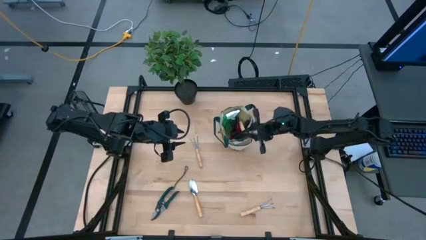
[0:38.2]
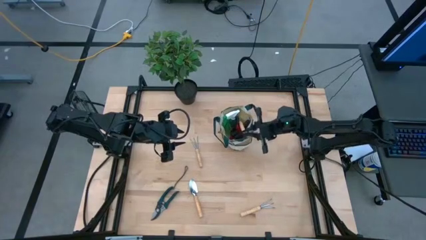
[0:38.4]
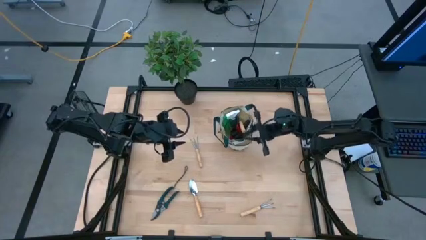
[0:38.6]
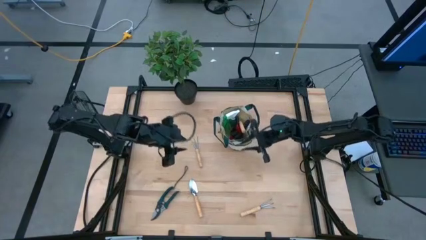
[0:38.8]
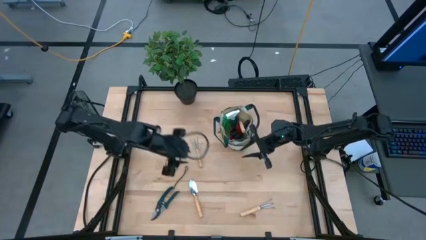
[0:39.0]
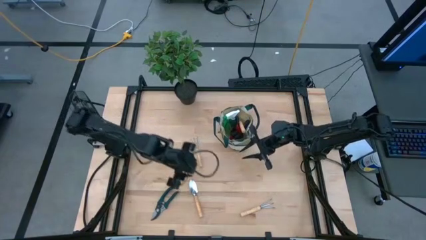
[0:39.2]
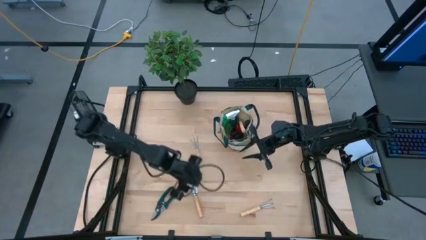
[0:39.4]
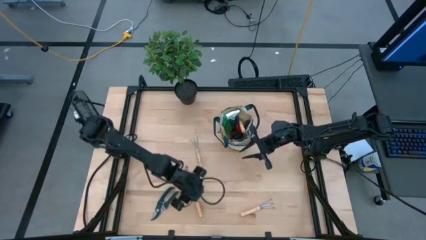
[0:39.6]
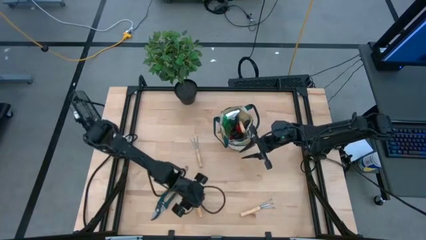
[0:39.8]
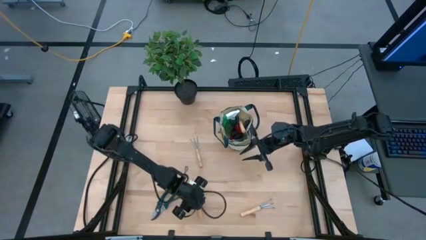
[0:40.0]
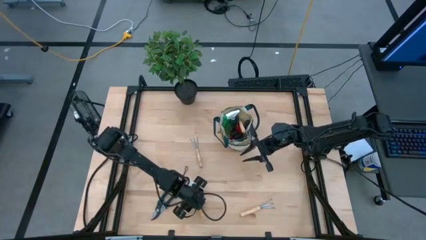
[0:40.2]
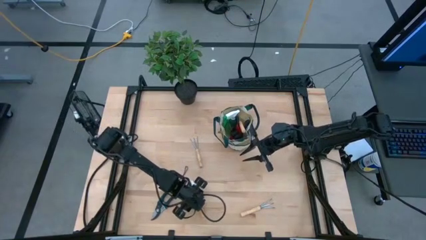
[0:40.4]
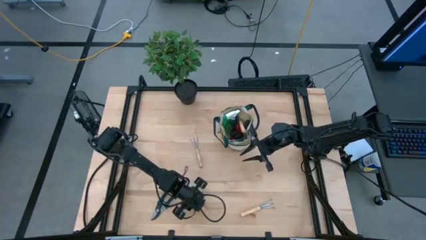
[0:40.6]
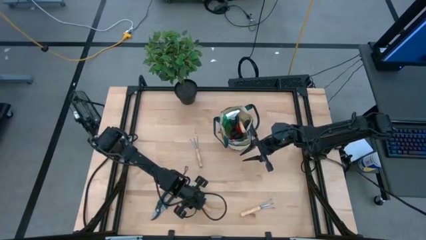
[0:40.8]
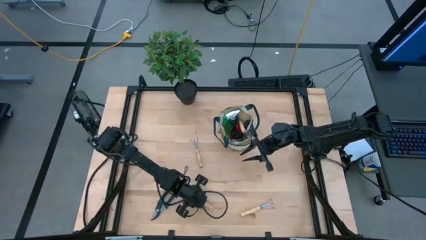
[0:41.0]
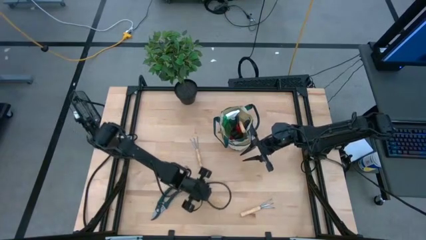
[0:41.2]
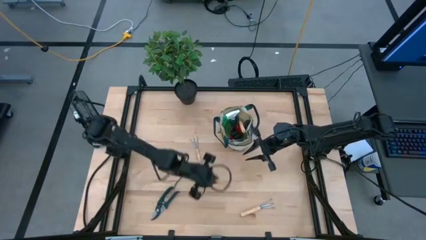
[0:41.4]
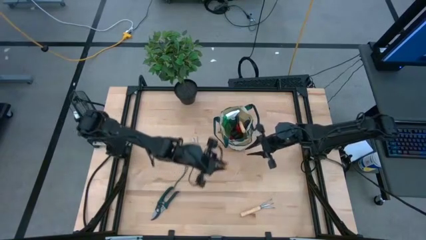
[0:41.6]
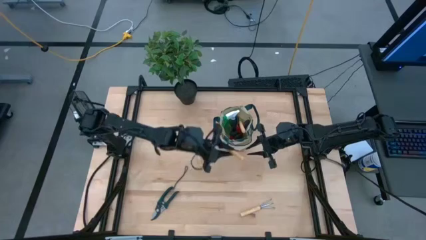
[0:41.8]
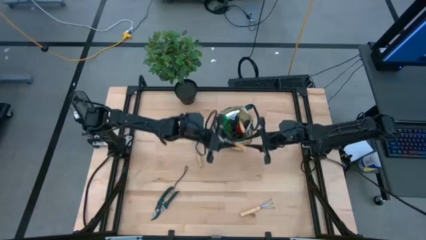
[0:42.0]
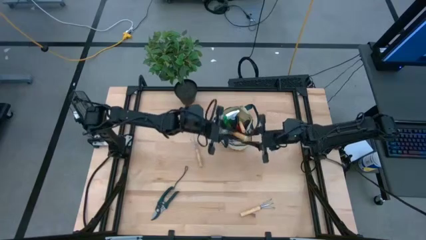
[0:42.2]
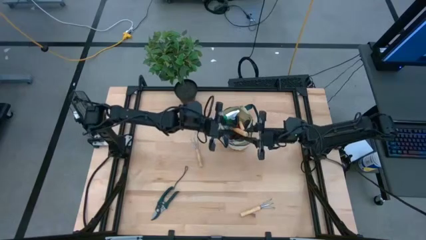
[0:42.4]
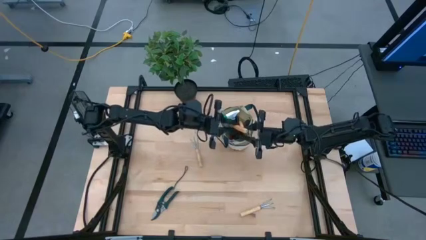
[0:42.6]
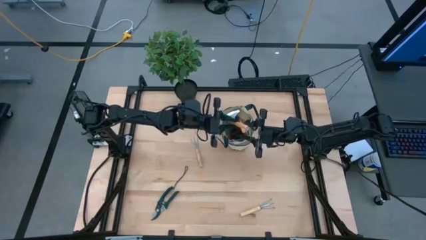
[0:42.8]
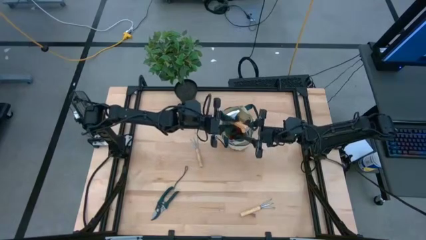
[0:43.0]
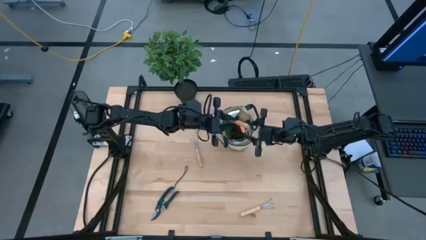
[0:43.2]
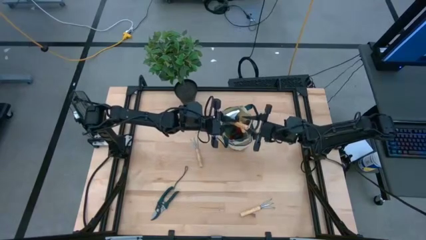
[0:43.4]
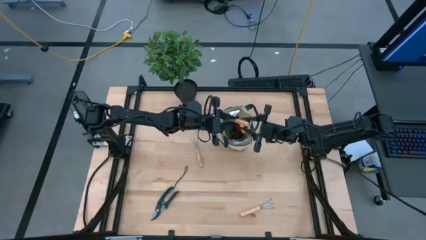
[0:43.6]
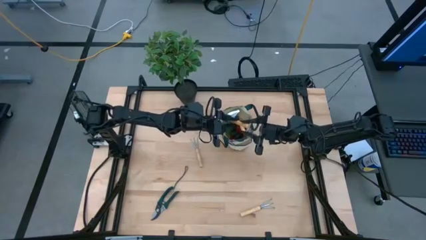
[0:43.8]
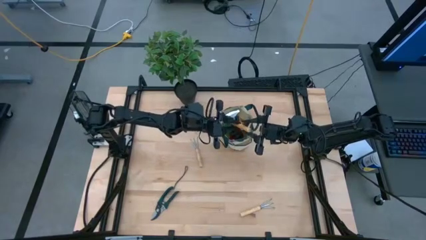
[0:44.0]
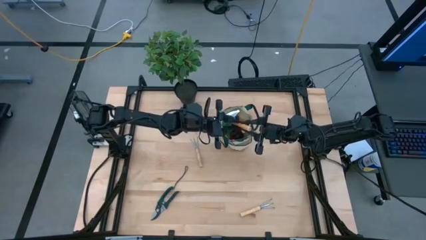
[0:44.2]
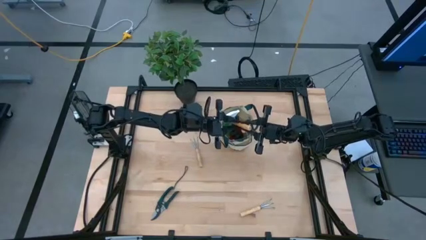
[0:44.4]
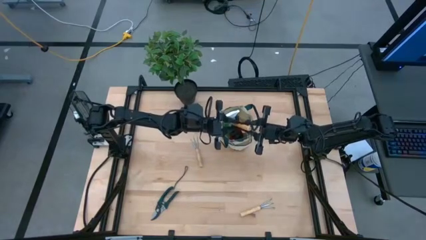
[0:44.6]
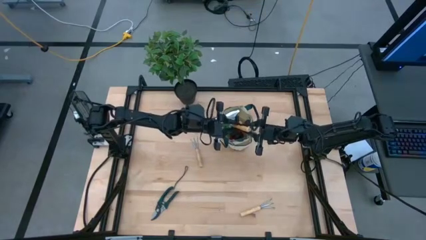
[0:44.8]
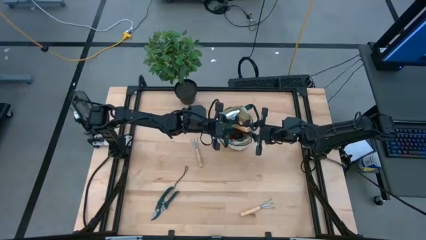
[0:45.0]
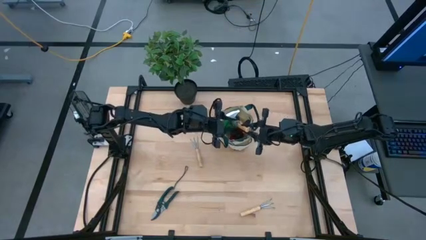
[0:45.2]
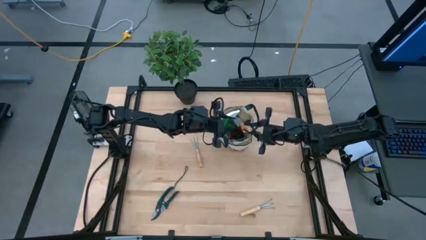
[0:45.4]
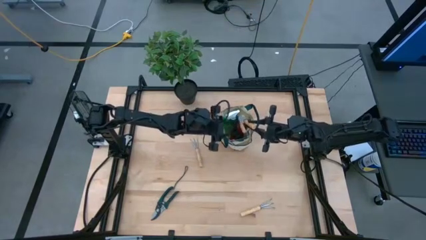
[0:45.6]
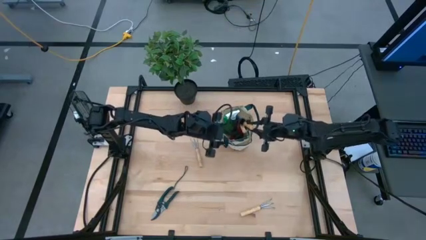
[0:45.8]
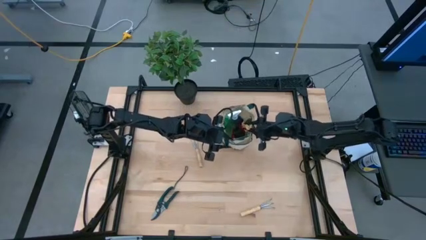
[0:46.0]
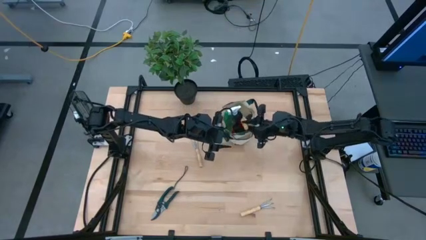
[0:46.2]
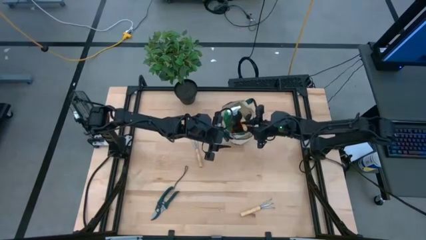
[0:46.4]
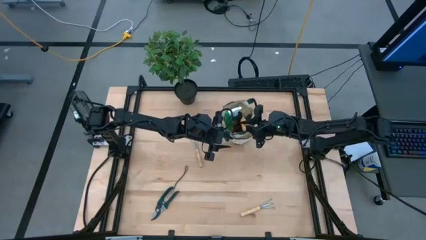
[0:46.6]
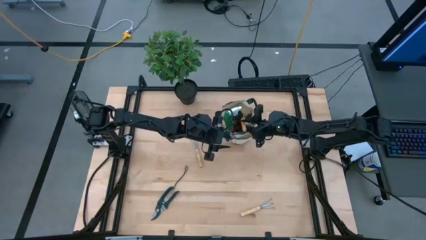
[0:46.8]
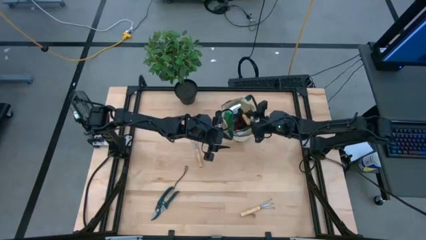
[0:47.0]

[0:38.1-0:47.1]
Task: Pick & Place Garden tools in Gardening bag
Put the brown trowel into the light brown gardening bag
